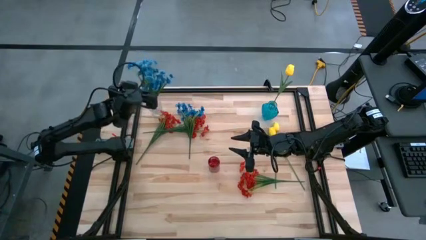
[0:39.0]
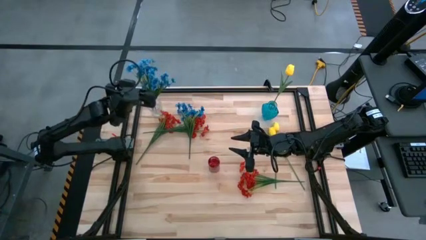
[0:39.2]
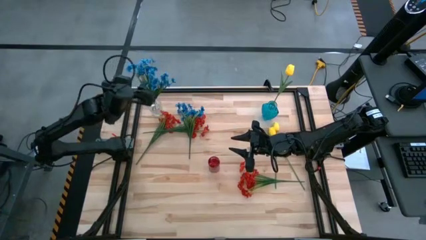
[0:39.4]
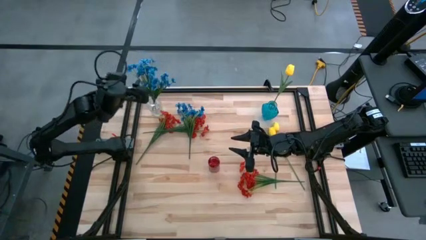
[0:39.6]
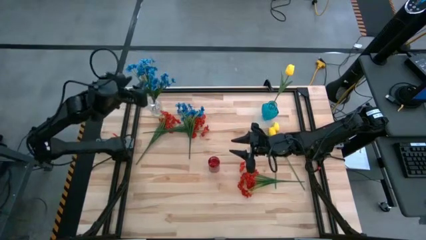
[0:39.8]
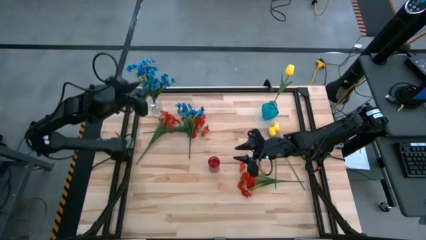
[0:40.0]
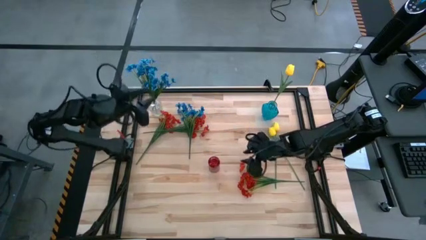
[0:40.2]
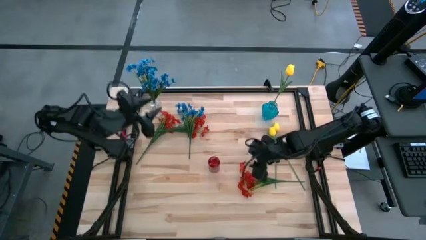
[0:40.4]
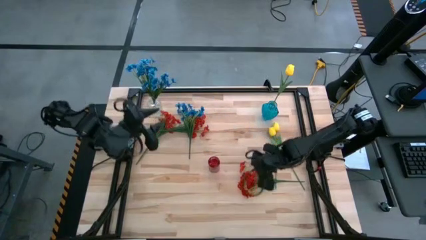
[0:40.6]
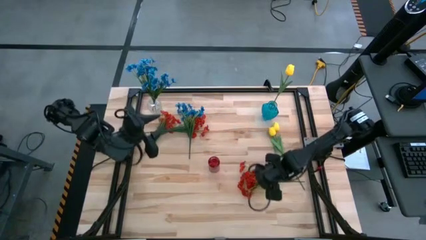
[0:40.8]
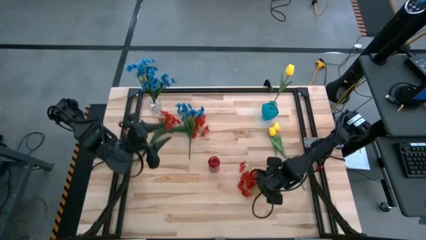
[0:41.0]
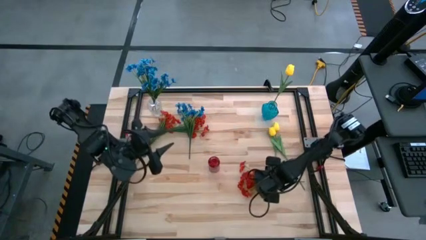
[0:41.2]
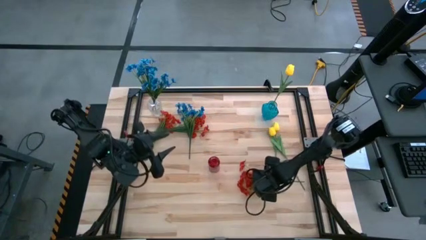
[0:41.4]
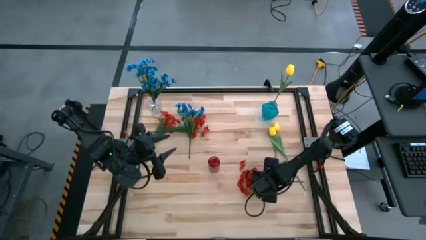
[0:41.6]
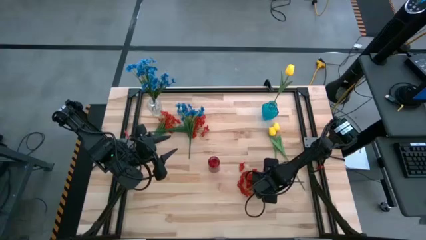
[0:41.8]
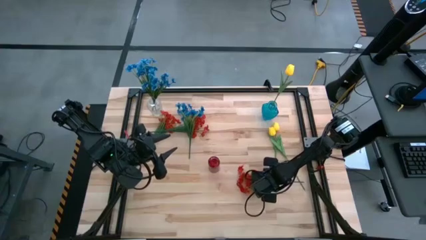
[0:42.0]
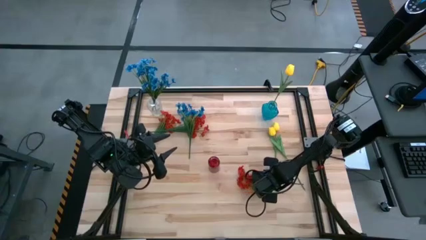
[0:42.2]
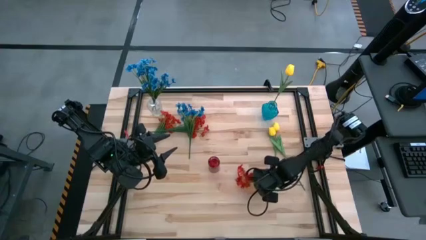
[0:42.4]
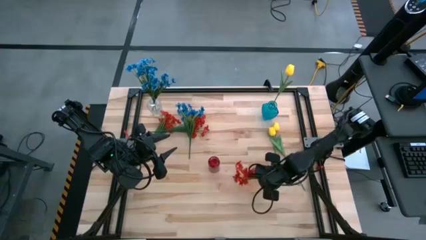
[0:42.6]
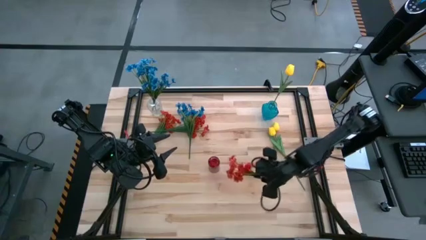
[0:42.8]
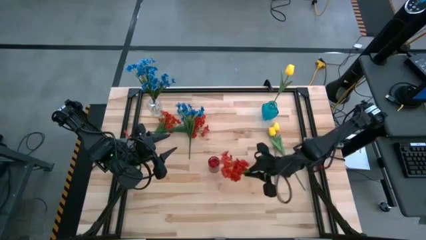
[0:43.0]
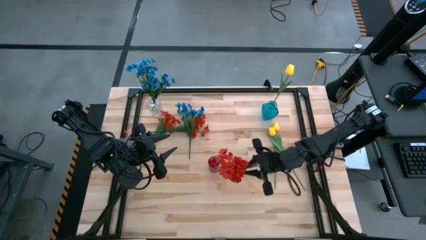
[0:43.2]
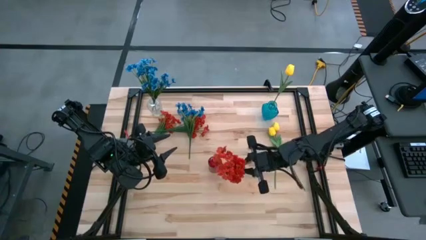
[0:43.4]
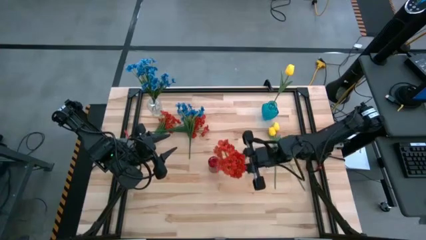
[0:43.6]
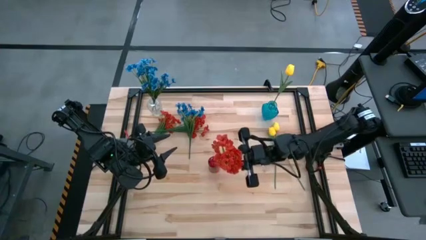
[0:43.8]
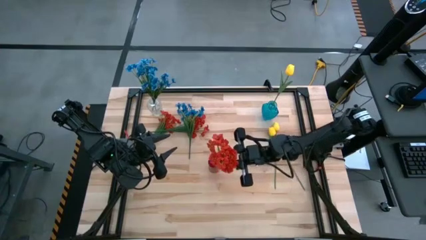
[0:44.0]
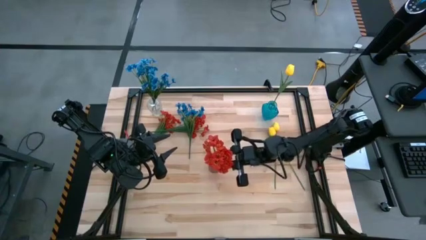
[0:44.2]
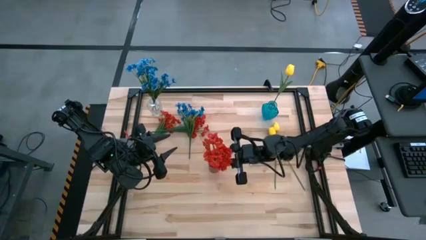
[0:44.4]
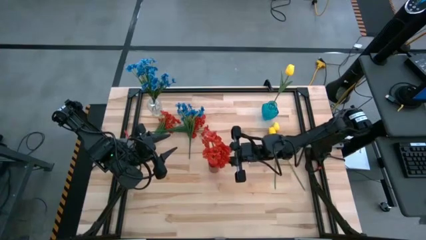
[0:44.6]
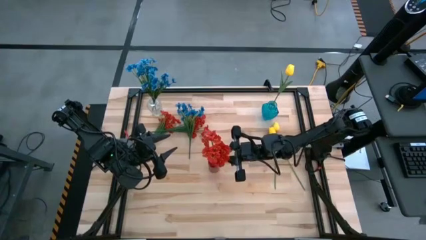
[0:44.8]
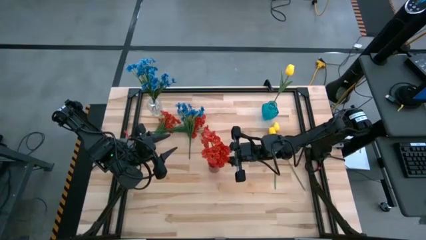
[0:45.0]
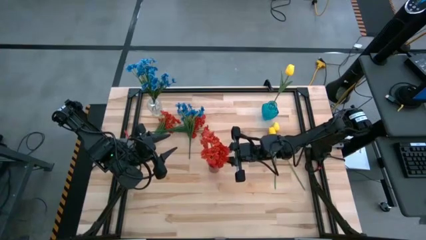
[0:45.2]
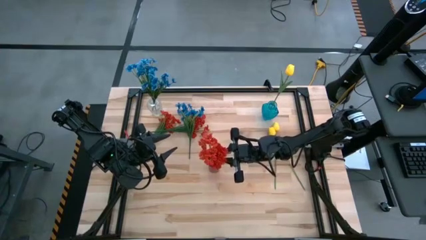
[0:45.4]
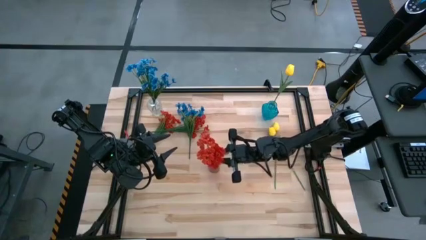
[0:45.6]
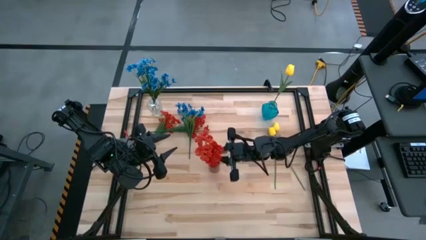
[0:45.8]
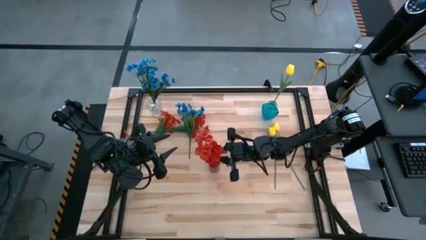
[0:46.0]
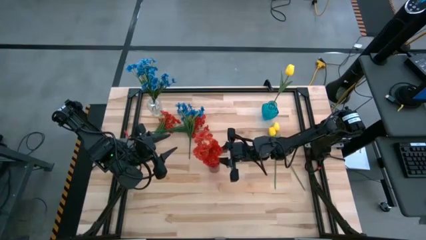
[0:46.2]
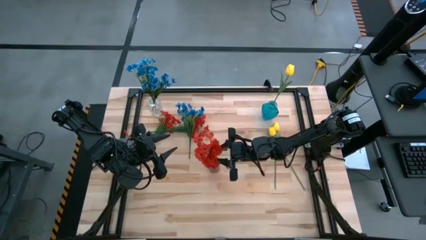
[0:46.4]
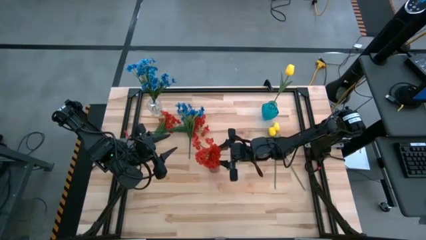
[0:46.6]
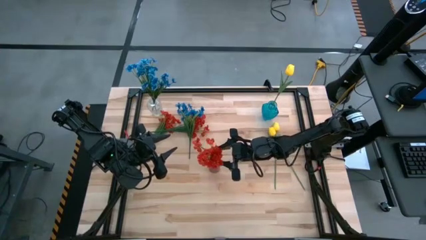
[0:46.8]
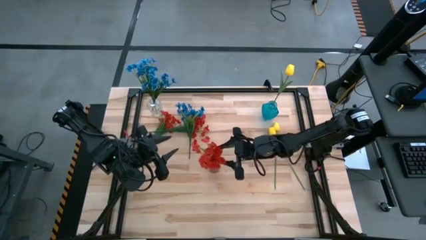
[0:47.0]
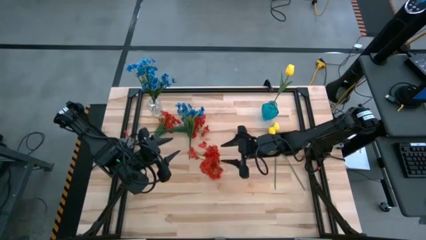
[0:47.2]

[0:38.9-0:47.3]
Task: Sort flowers into vase by color
Put the bottom red flowers into the red vase

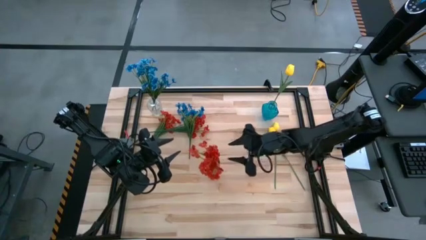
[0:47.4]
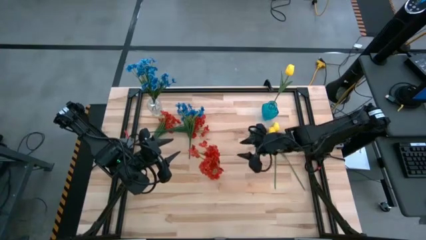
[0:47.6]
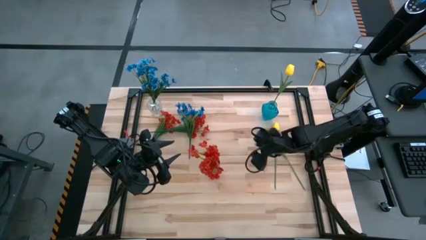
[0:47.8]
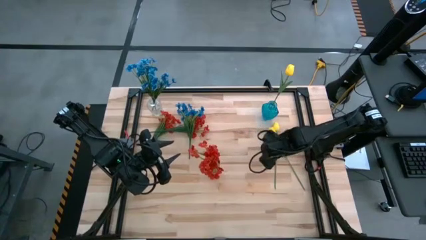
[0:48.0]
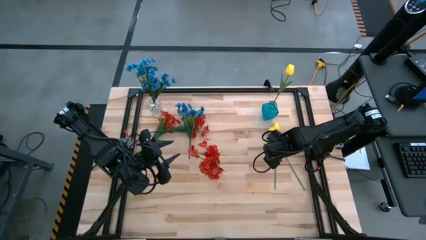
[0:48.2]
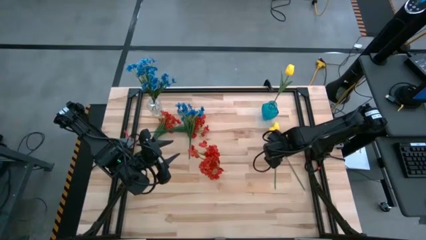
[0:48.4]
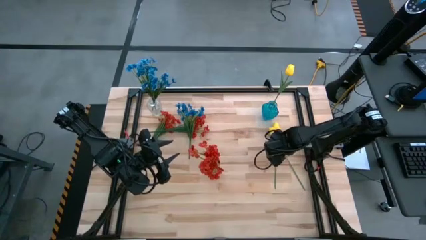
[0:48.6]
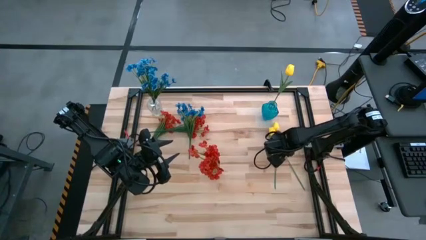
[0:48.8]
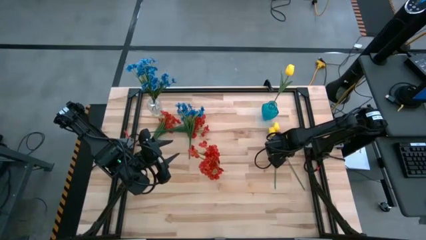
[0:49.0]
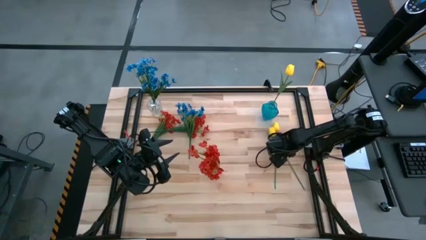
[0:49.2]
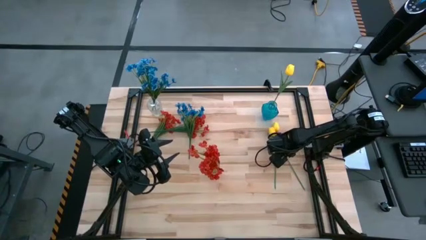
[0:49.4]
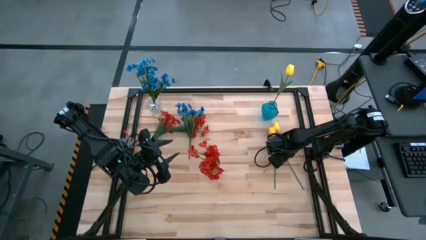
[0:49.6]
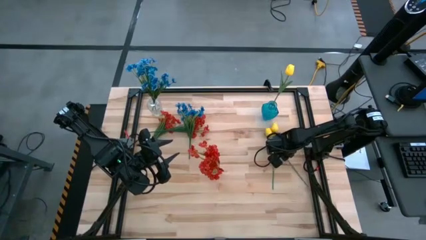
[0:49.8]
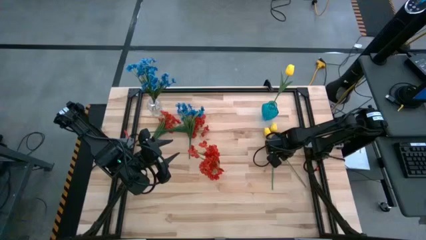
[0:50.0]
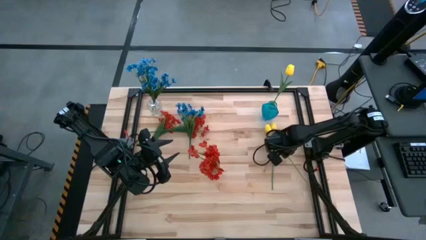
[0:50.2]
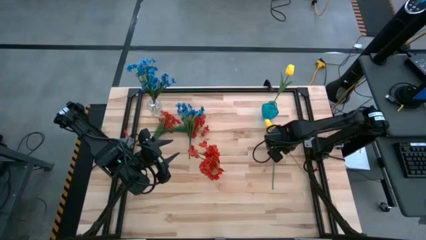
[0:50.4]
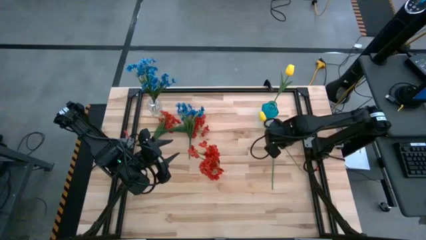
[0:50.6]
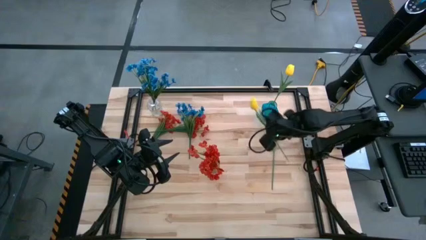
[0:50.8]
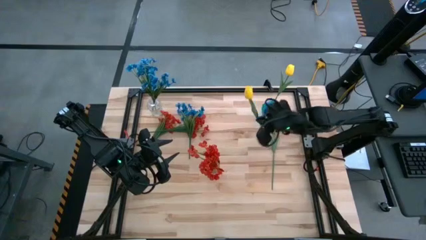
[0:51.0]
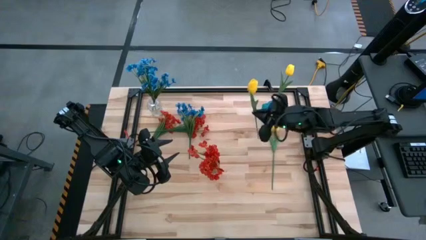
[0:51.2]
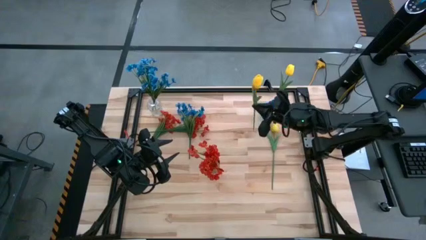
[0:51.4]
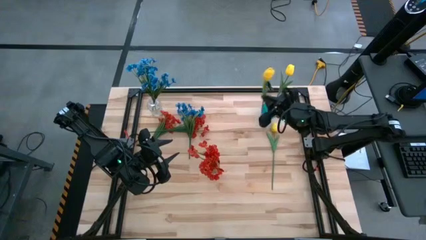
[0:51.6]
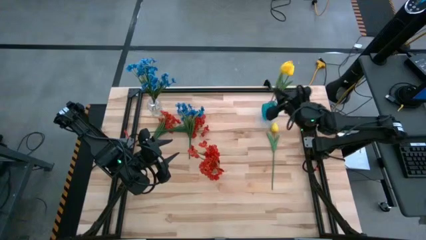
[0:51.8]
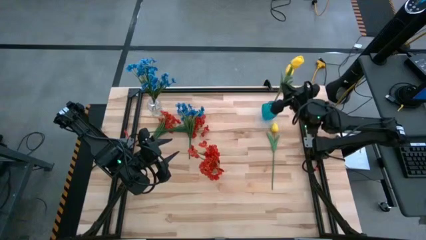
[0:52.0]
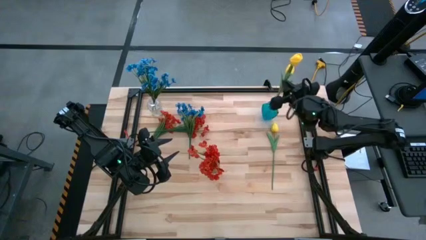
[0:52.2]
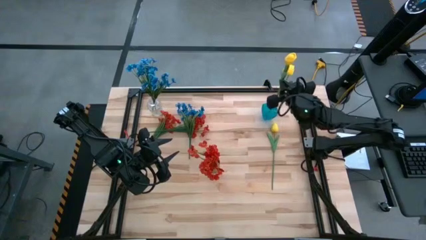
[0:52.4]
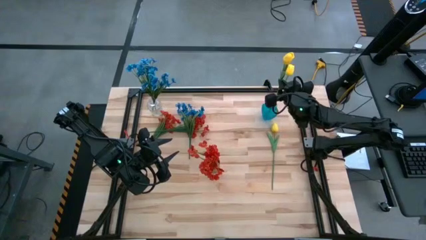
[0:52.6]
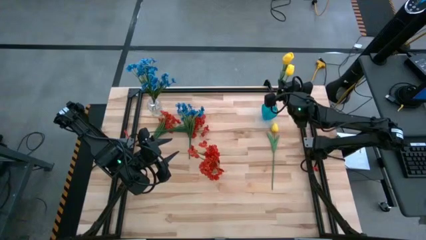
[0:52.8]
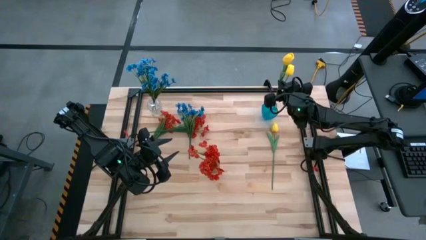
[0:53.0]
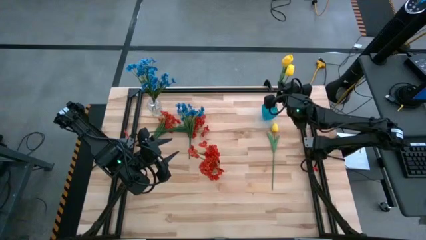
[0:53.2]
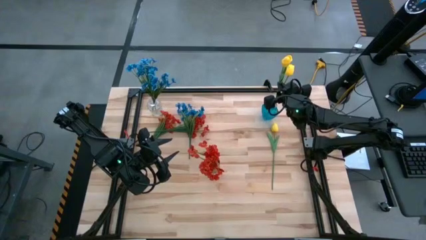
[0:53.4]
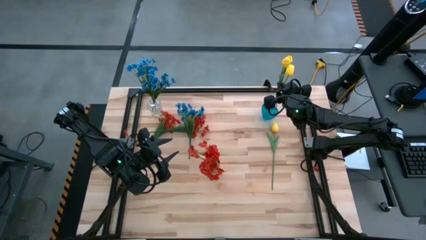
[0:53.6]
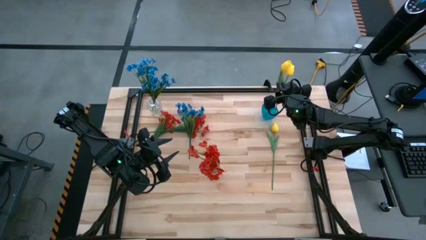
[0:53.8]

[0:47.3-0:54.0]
Put the top yellow tulip into the blue vase
